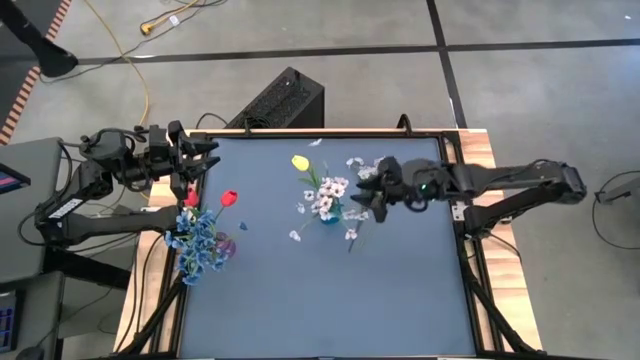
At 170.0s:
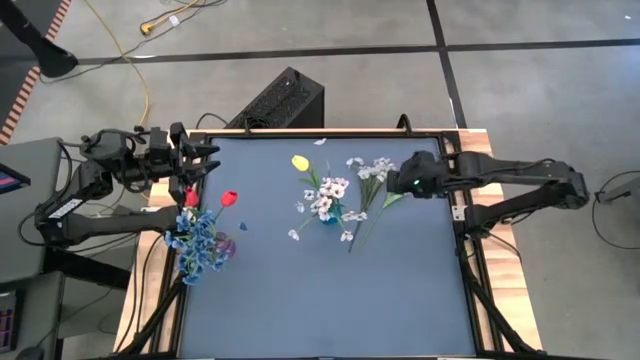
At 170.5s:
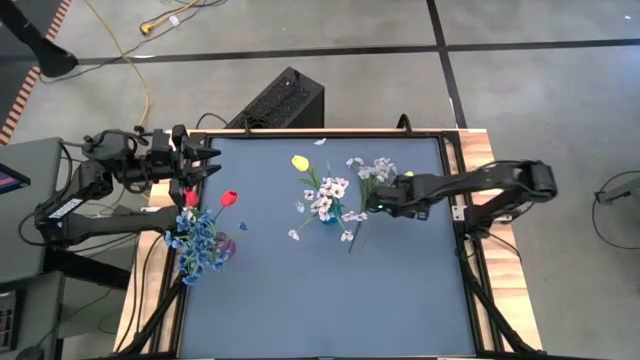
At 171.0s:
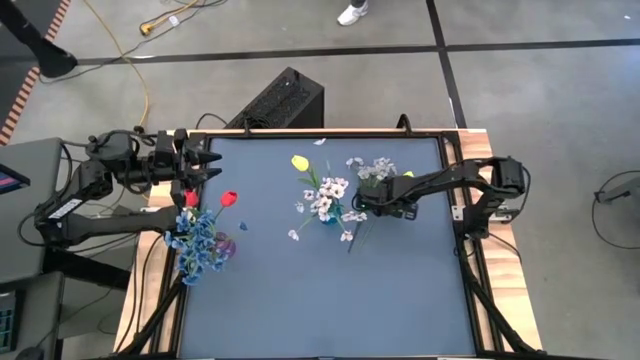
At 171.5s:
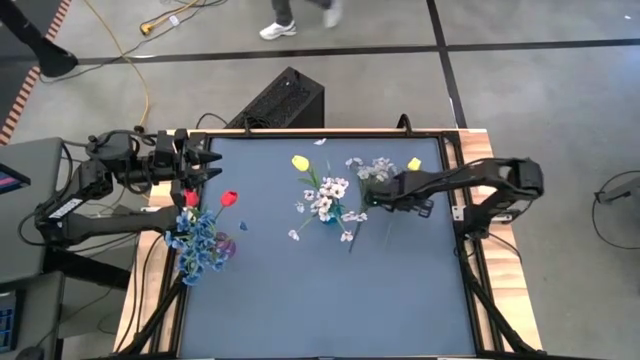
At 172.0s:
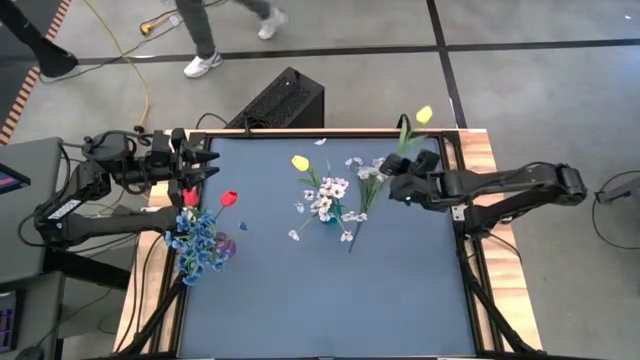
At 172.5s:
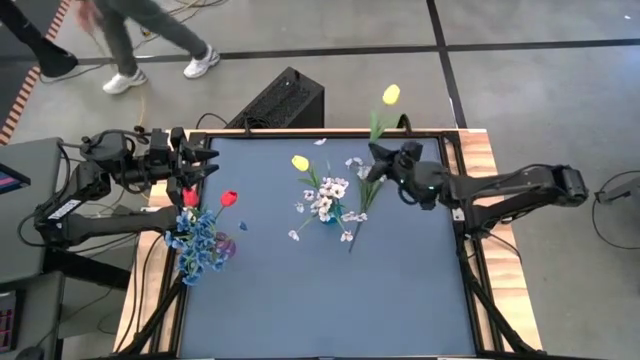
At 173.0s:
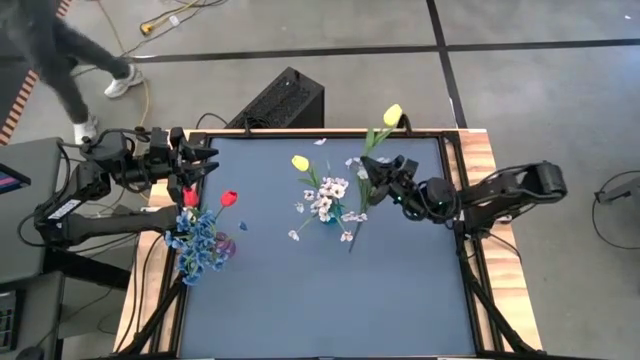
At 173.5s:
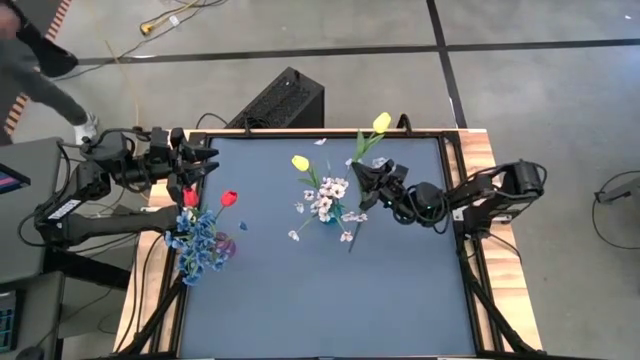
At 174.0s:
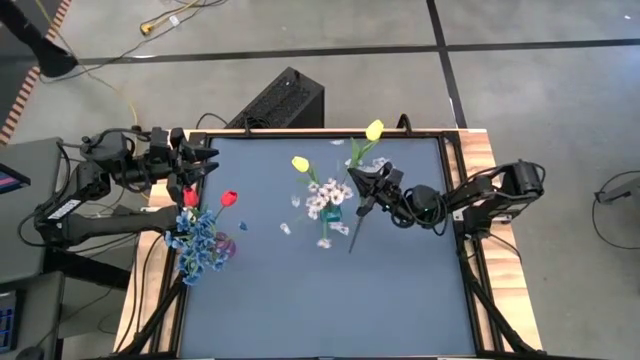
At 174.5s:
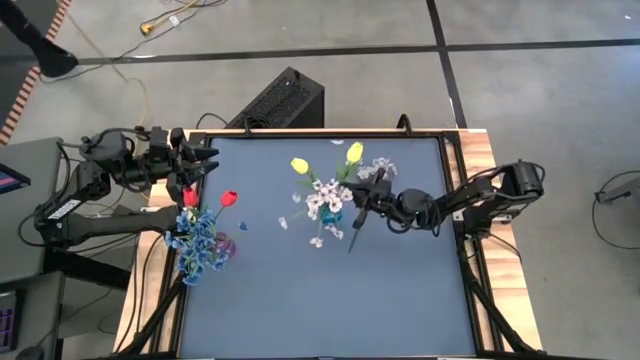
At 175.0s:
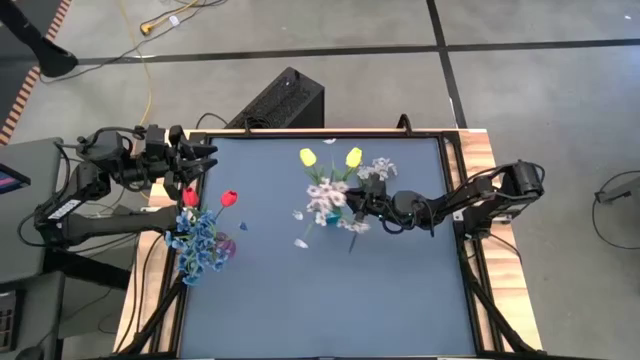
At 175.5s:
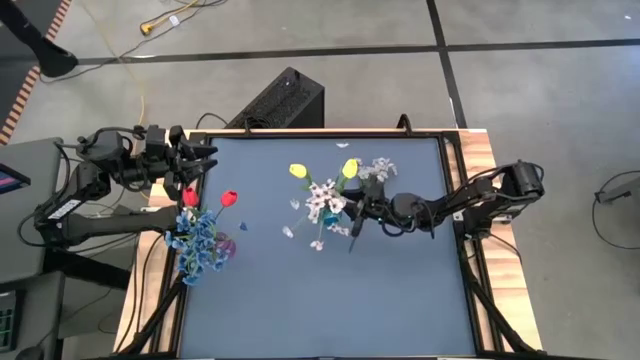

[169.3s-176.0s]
Task: Sort flowers into vase by color
Put the yellow tulip into the blue vase

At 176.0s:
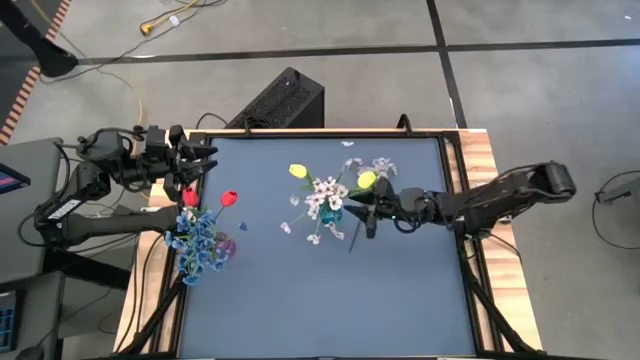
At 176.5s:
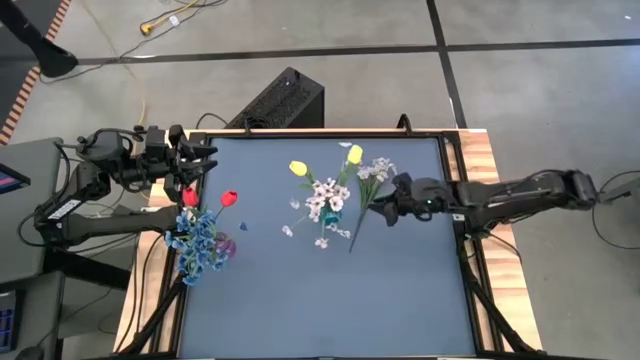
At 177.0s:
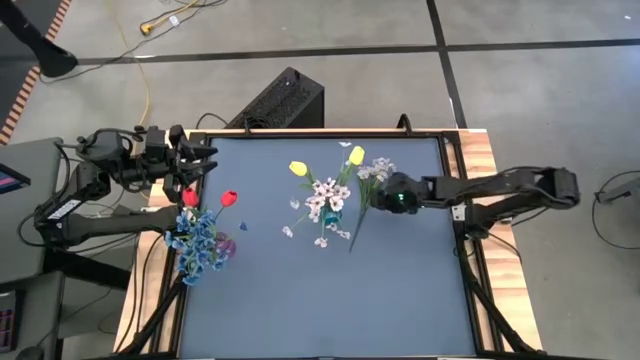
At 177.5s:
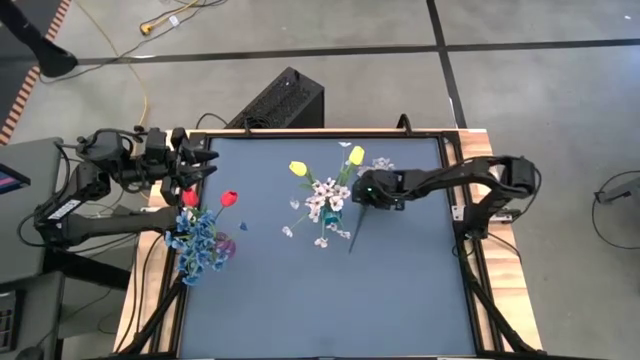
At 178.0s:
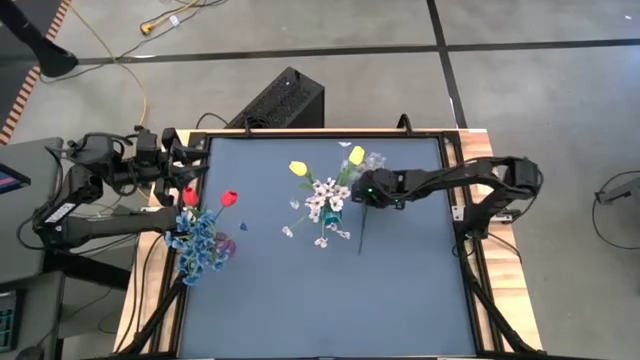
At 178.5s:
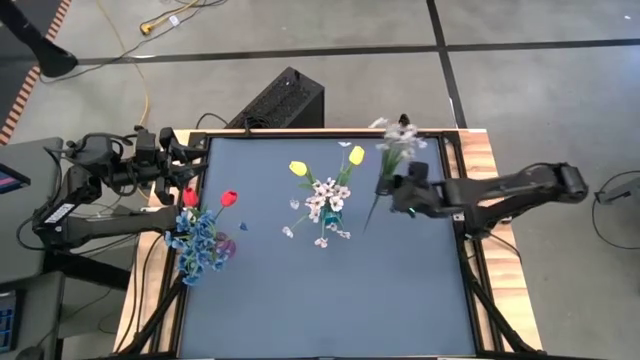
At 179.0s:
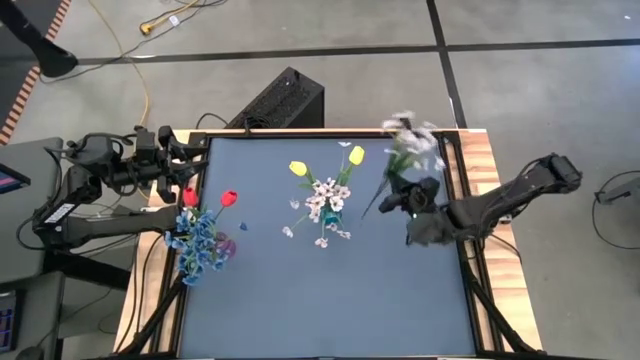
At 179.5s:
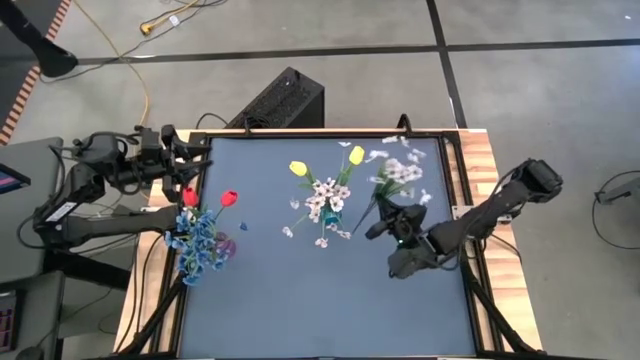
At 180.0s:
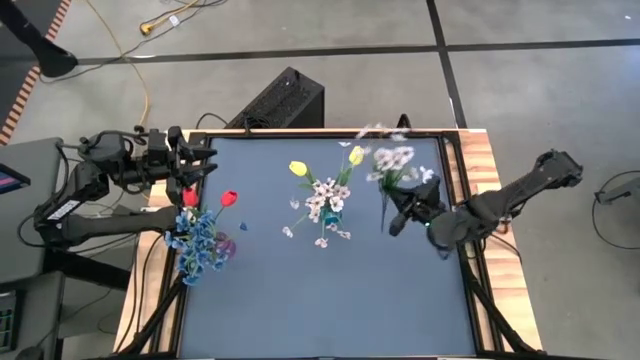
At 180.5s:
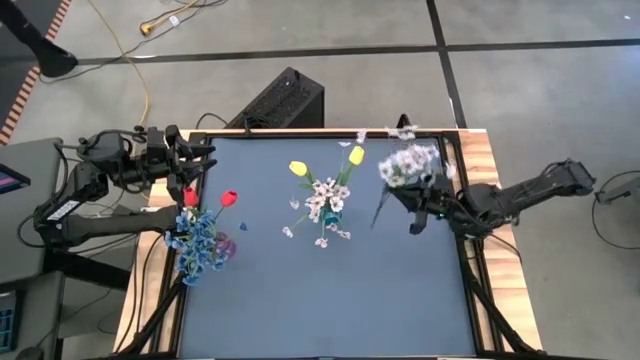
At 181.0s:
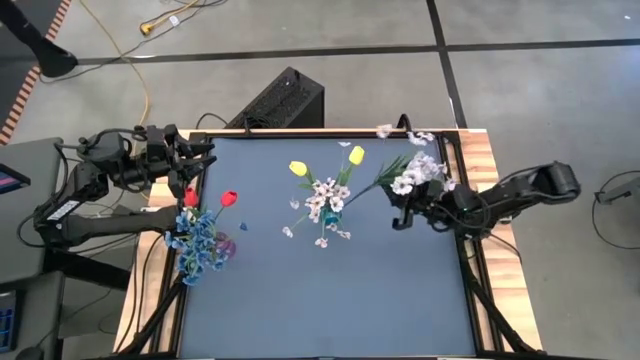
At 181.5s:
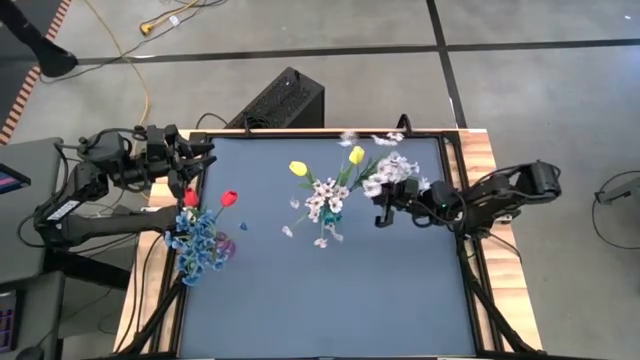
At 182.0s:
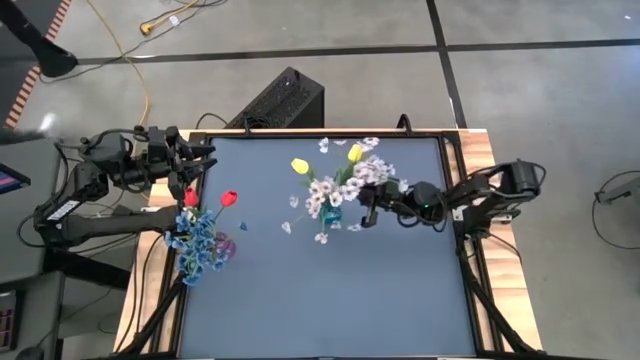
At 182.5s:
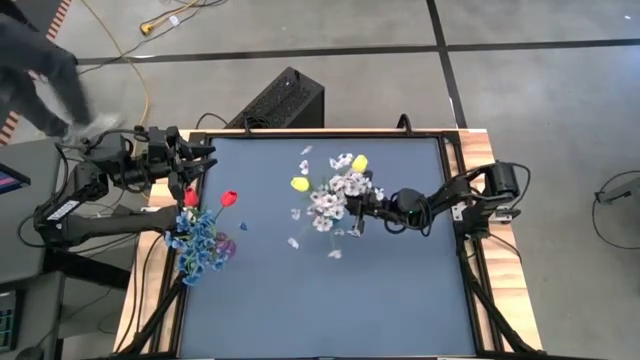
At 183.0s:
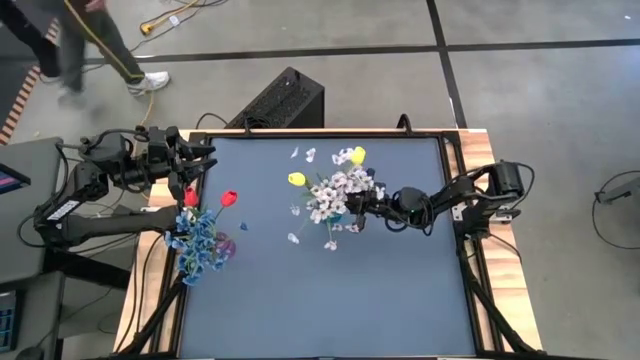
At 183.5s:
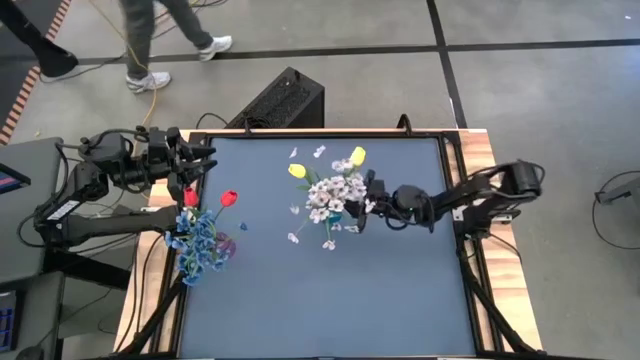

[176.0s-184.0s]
Put the white flowers into the blue vase

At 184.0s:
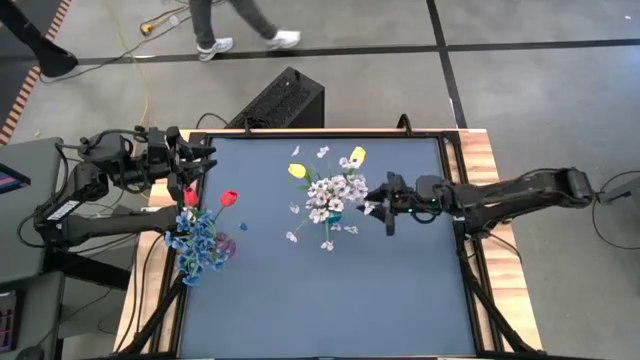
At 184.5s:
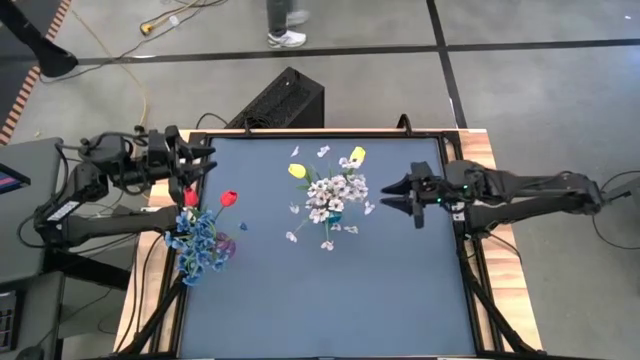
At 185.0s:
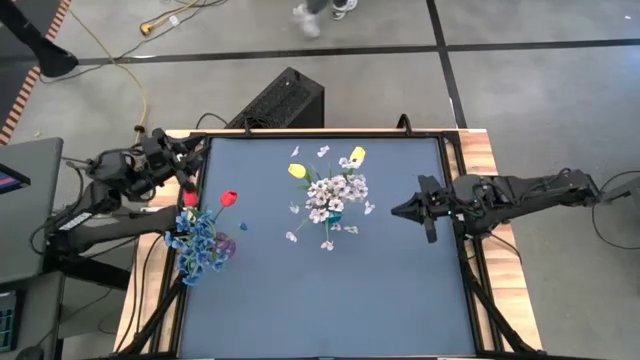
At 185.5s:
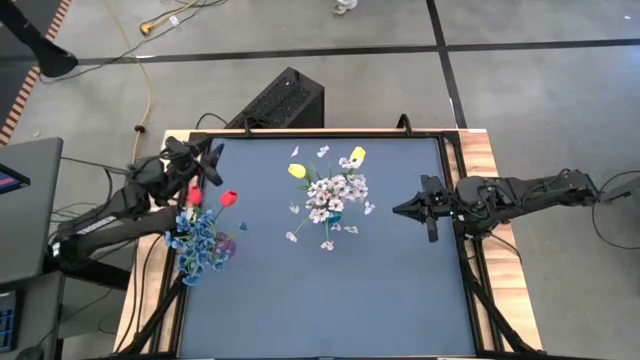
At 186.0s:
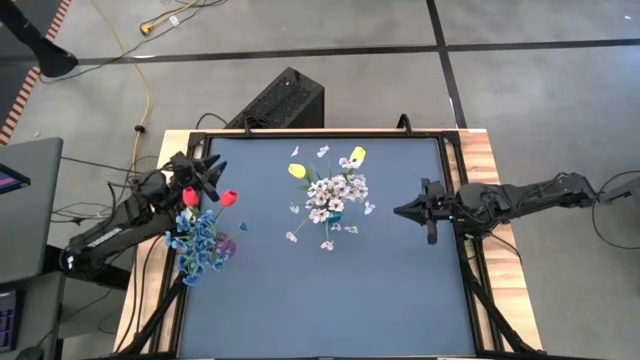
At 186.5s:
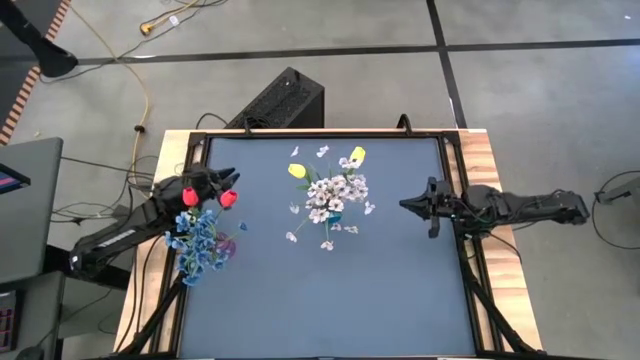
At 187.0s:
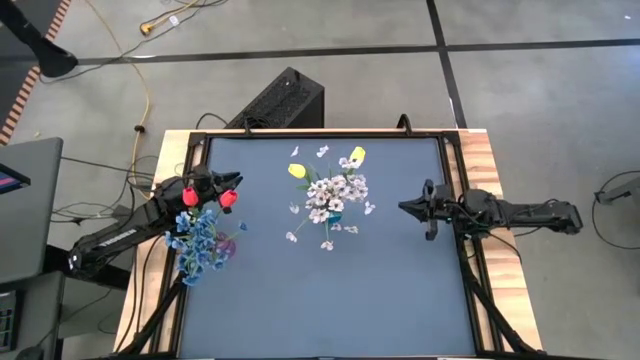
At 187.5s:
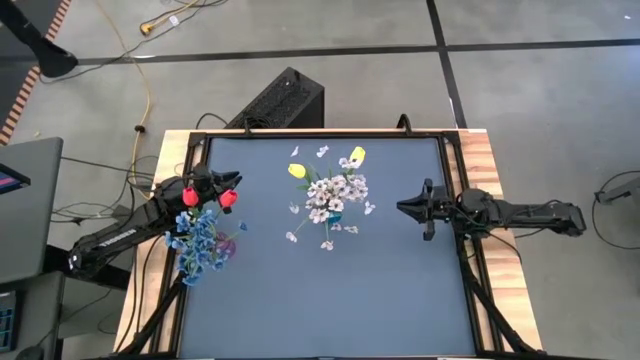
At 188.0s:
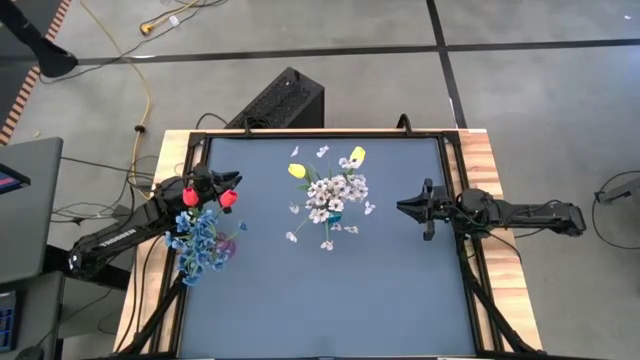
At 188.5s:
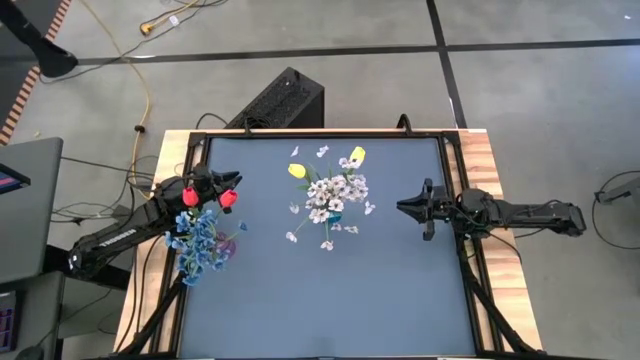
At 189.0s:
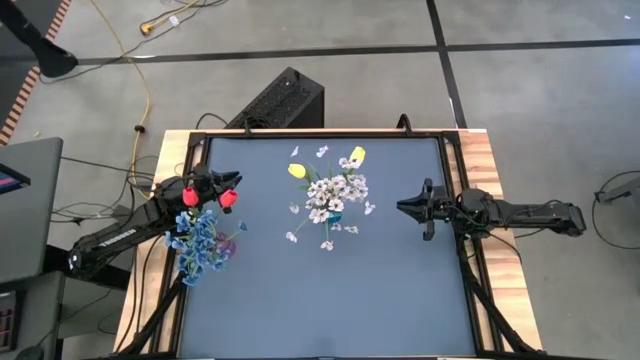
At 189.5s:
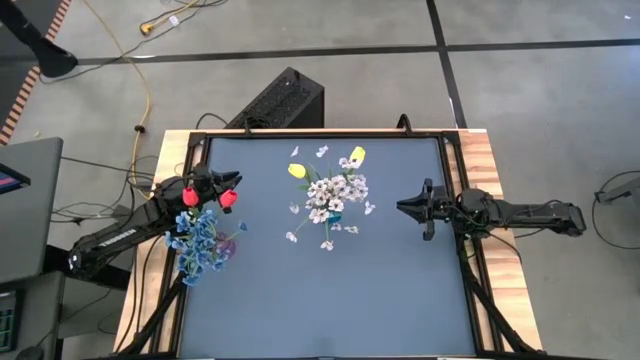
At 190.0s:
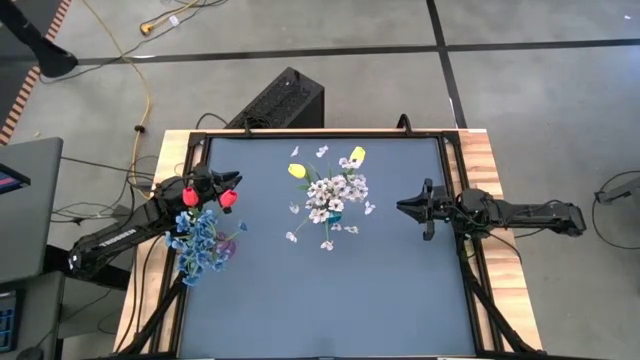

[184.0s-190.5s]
Return to Home Position
